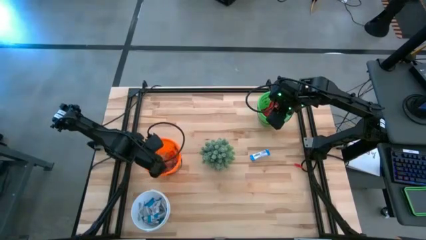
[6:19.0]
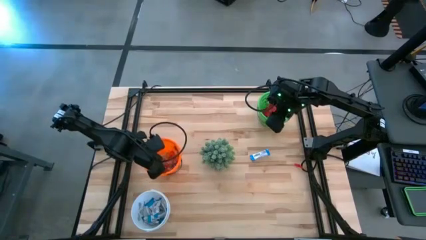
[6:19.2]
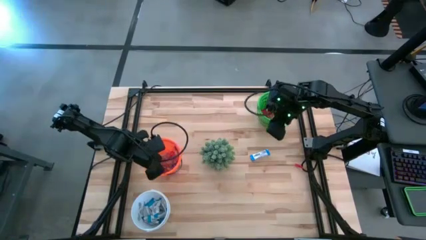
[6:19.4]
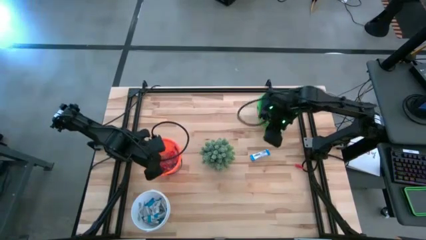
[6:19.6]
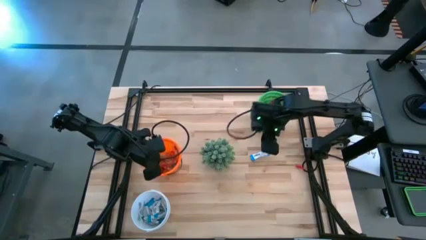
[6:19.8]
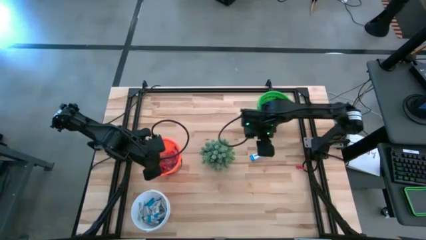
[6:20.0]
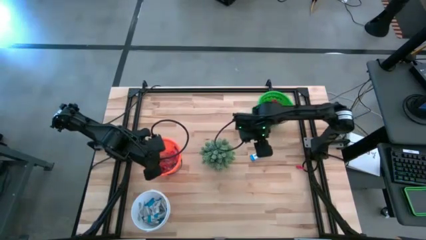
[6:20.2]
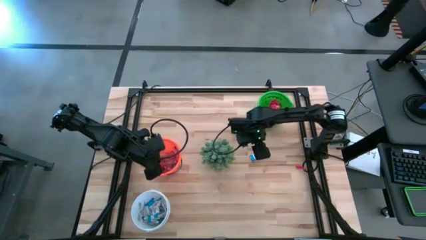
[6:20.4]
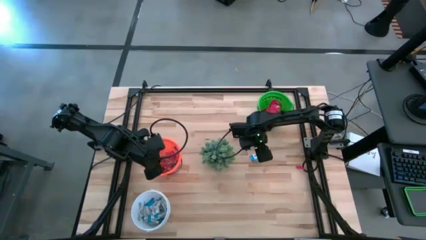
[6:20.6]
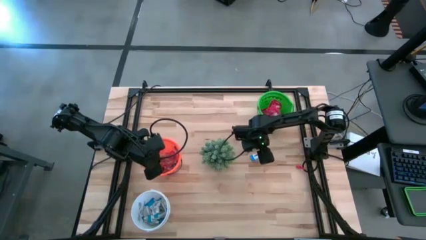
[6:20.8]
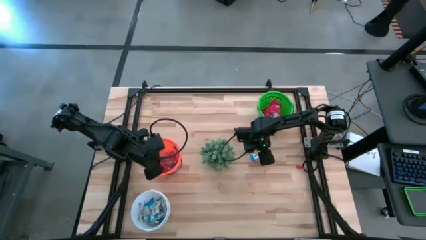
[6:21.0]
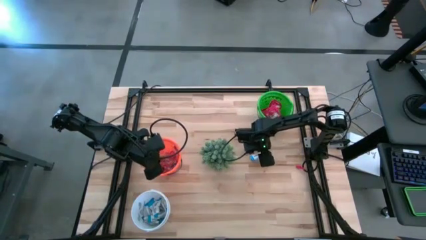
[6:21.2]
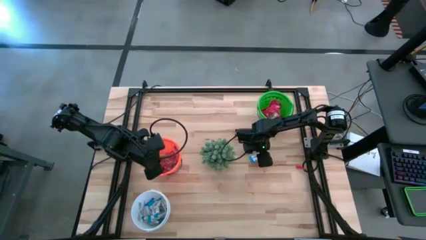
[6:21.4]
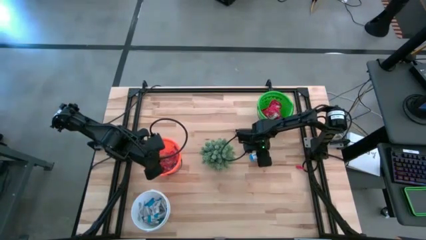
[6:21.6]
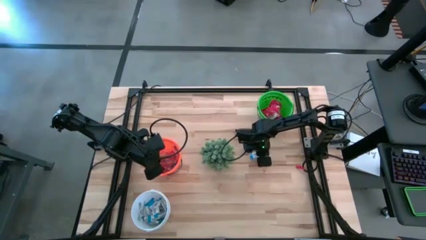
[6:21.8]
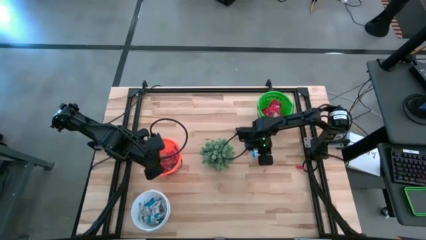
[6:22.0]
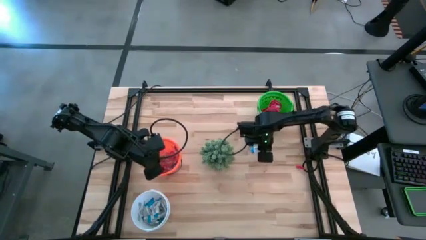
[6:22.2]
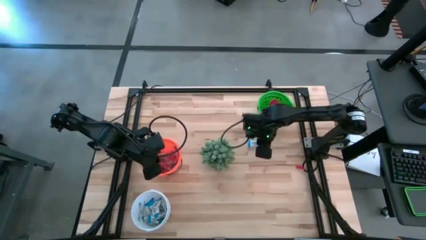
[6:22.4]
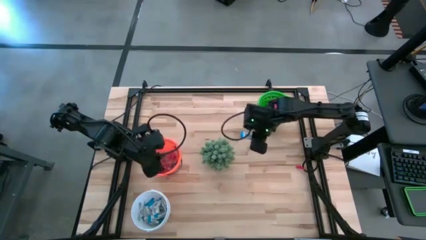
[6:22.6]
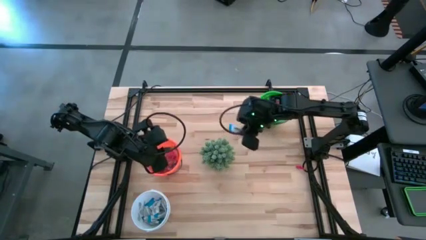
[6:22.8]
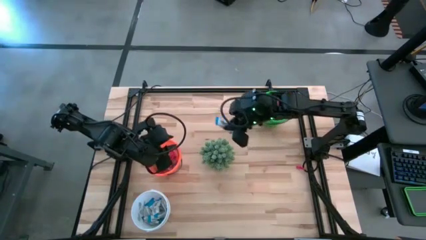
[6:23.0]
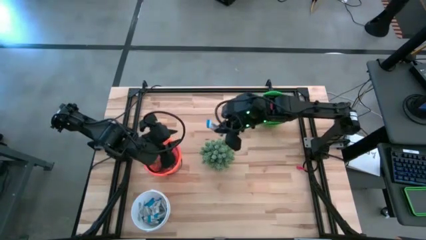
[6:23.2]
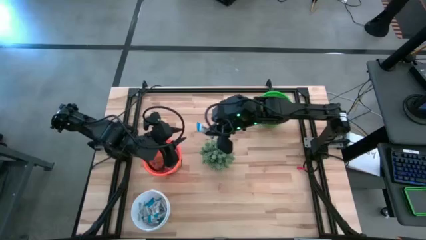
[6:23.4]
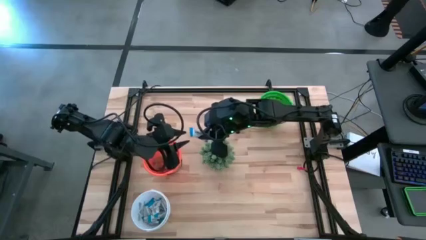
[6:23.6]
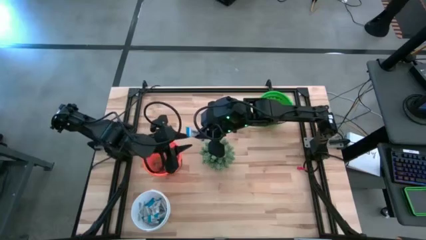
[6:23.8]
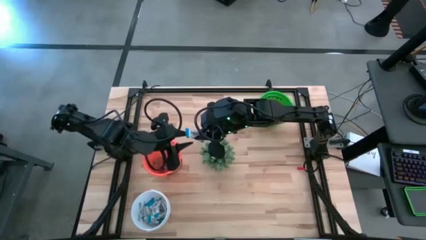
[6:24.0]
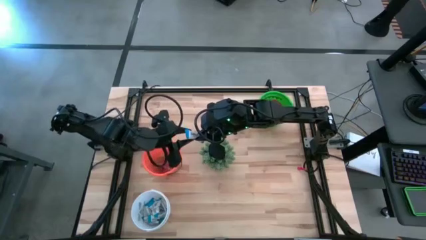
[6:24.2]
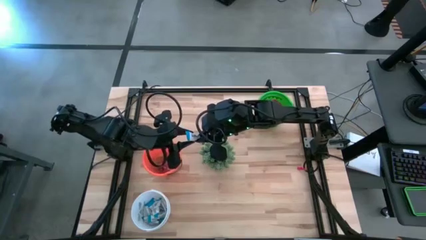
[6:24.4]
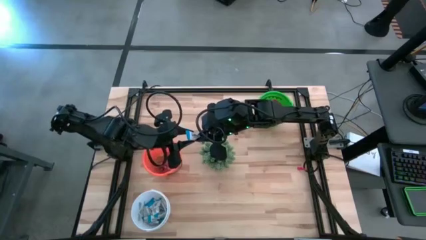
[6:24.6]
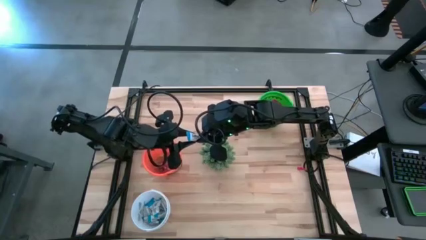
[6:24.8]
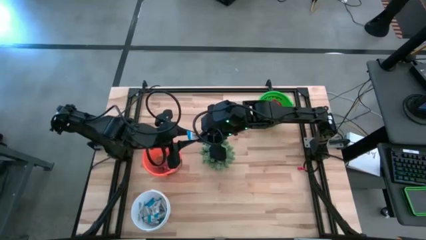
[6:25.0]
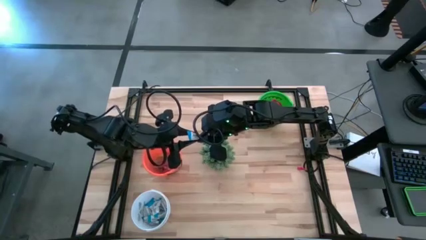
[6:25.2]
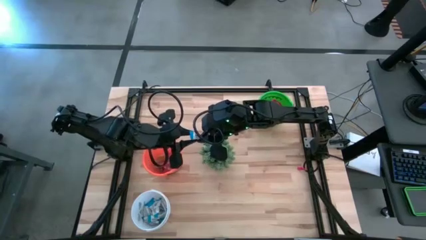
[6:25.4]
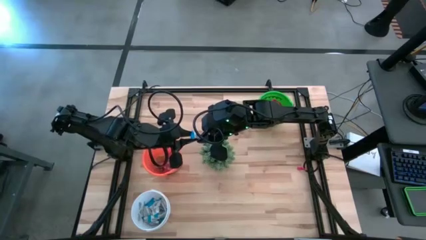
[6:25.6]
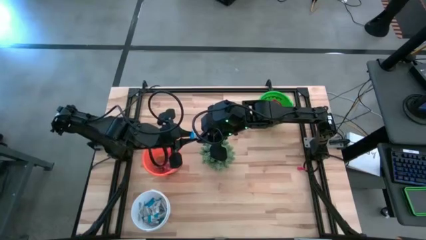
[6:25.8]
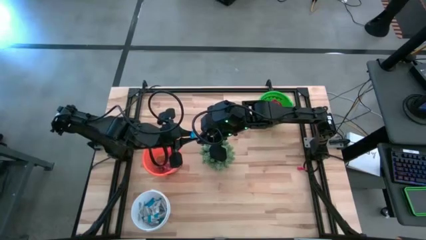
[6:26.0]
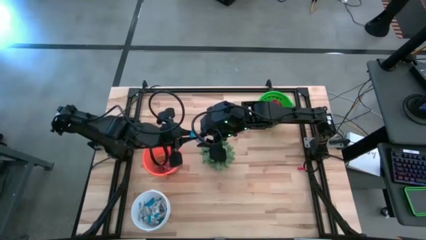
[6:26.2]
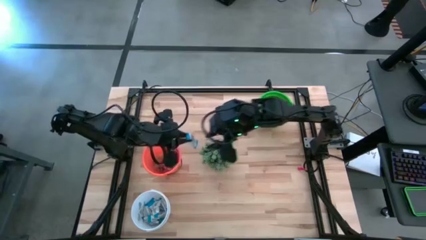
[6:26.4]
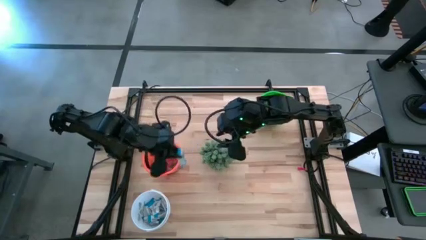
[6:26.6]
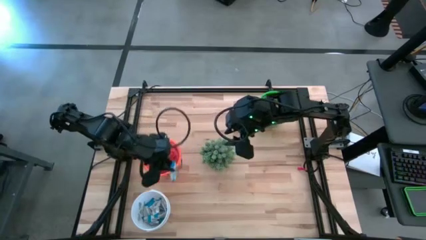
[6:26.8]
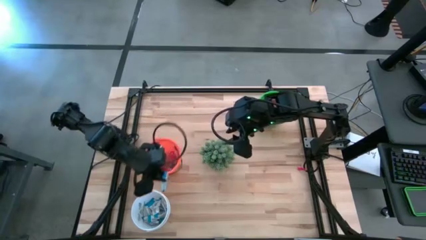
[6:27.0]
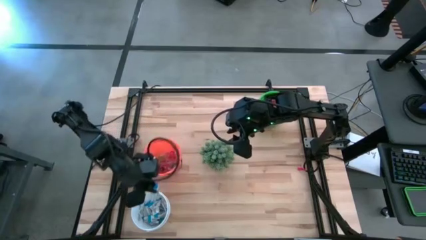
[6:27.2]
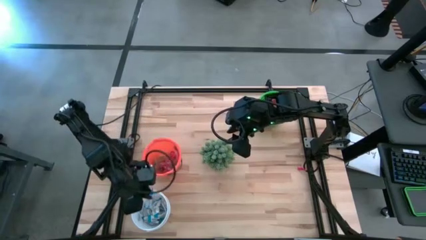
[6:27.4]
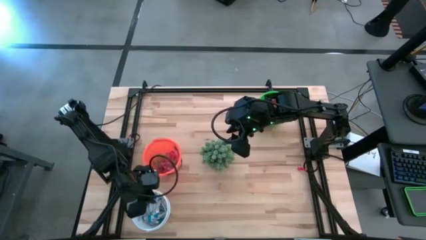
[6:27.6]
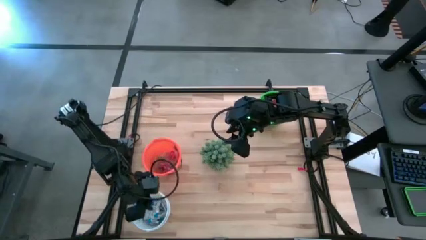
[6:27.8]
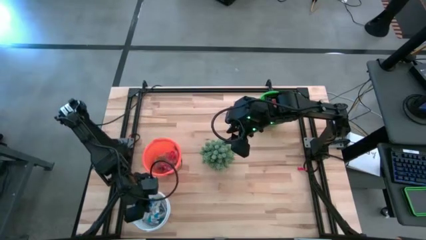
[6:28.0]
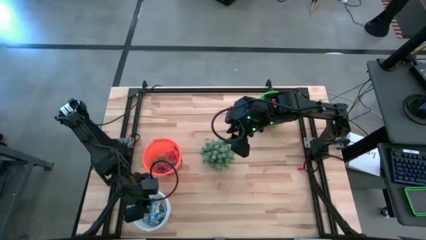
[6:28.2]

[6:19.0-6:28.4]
Task: Sort candy
Put the white chocolate into the white bucket

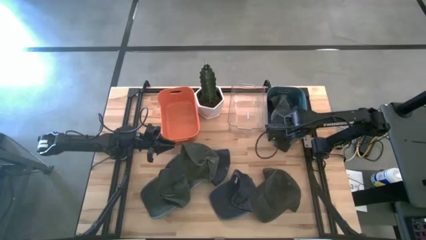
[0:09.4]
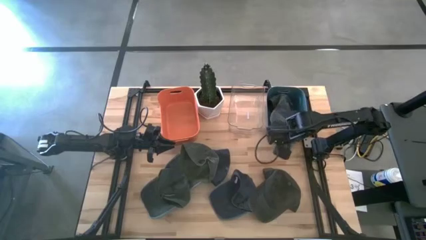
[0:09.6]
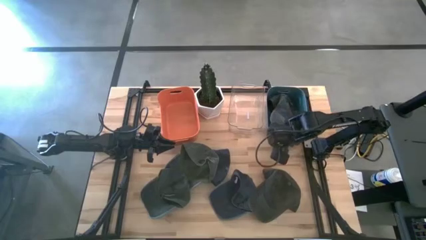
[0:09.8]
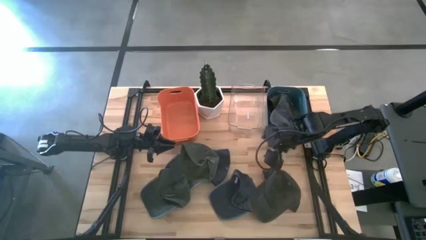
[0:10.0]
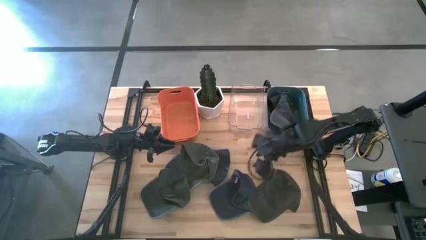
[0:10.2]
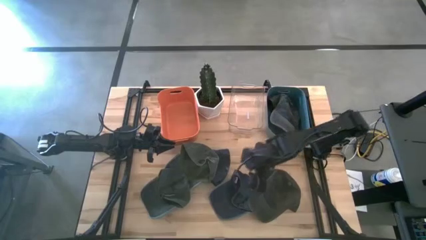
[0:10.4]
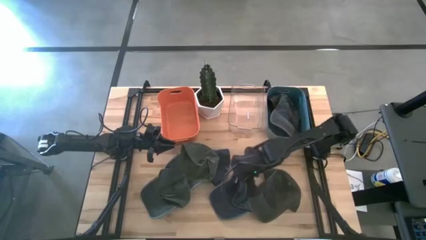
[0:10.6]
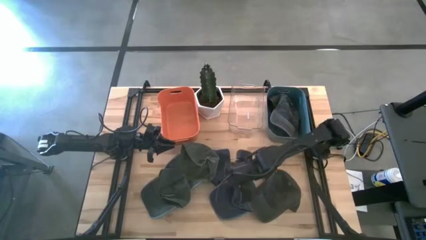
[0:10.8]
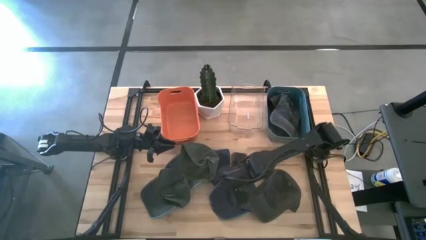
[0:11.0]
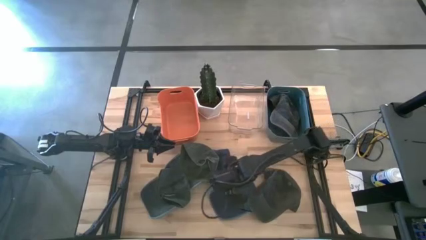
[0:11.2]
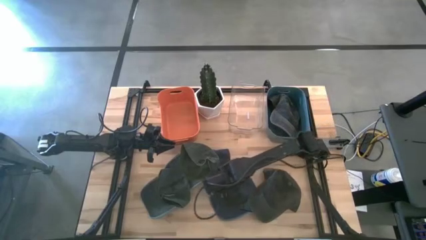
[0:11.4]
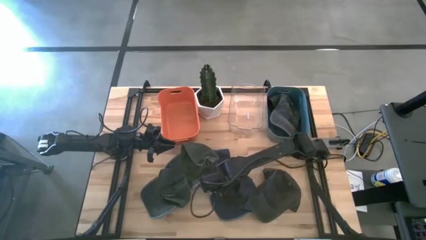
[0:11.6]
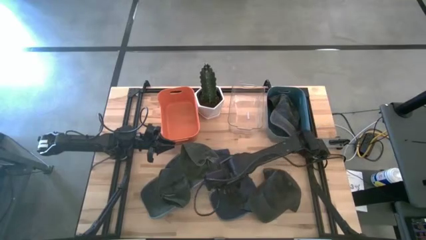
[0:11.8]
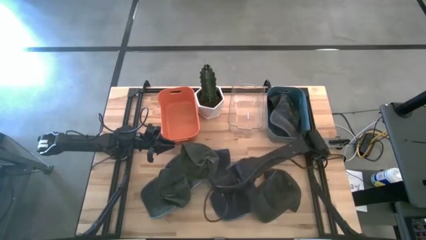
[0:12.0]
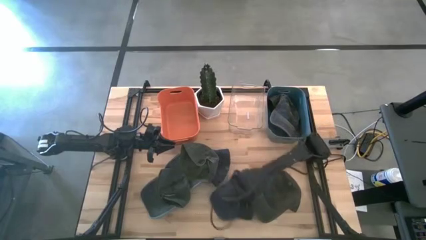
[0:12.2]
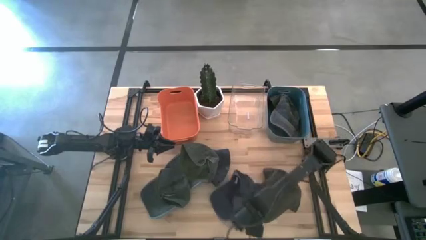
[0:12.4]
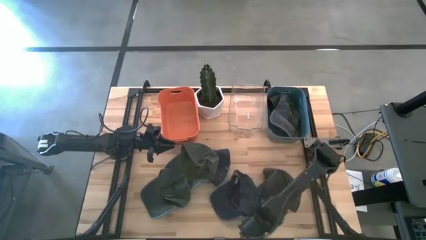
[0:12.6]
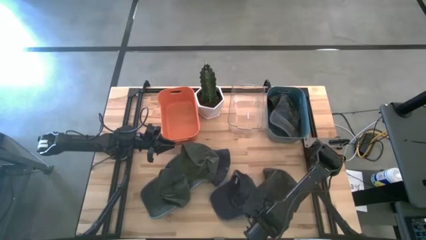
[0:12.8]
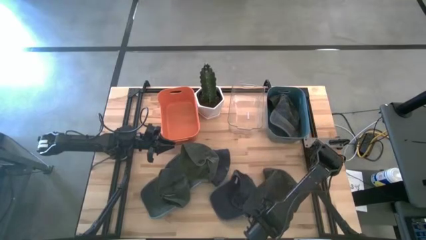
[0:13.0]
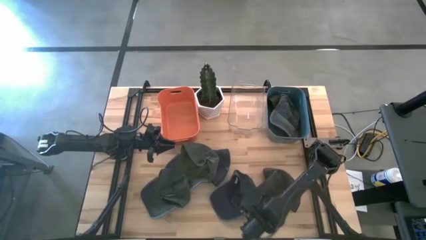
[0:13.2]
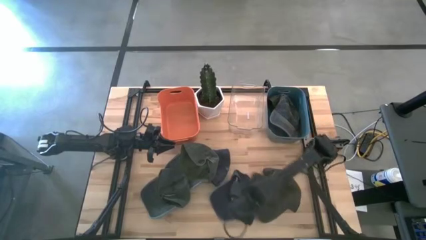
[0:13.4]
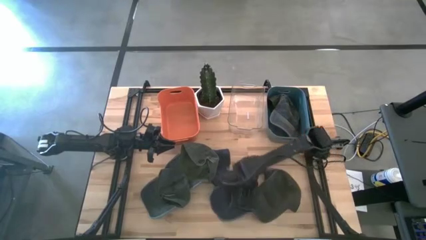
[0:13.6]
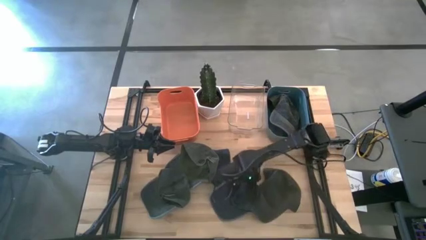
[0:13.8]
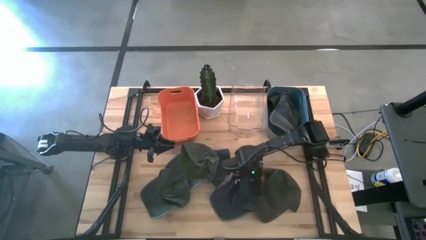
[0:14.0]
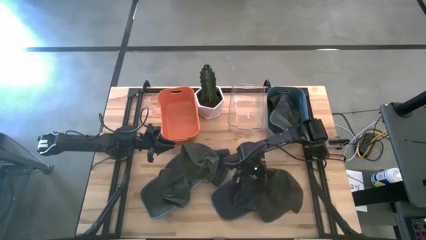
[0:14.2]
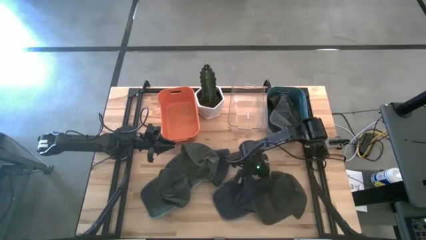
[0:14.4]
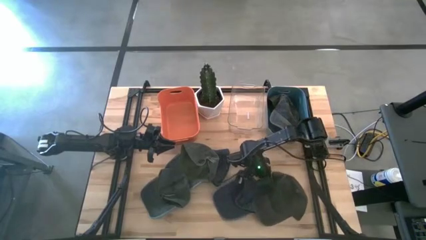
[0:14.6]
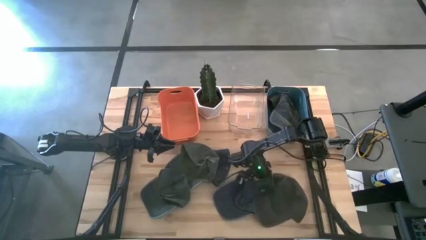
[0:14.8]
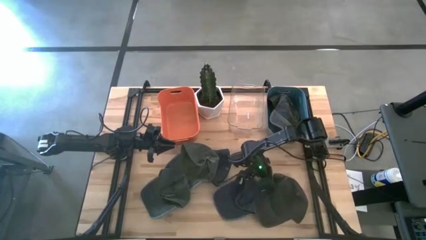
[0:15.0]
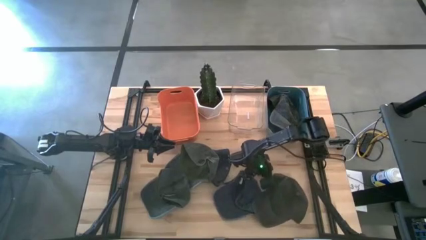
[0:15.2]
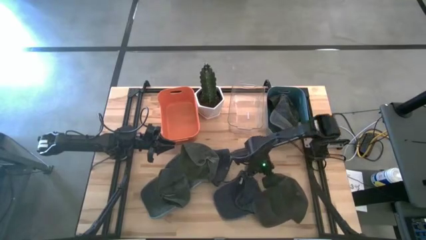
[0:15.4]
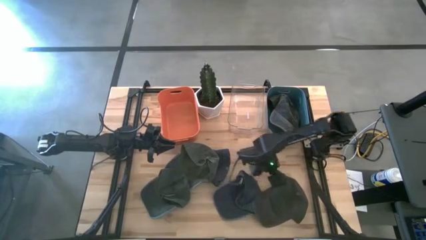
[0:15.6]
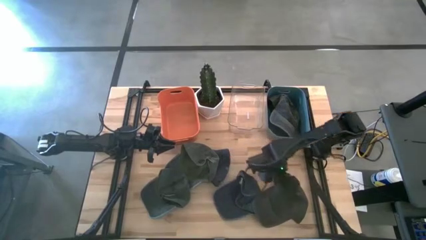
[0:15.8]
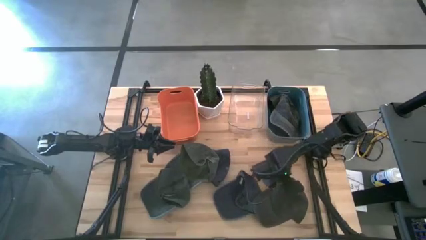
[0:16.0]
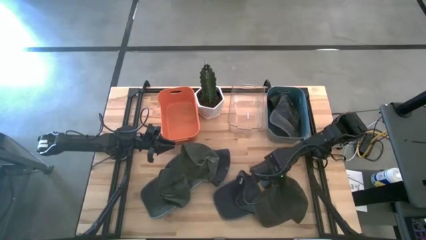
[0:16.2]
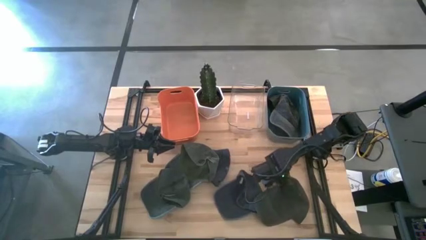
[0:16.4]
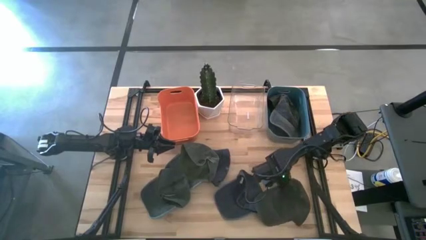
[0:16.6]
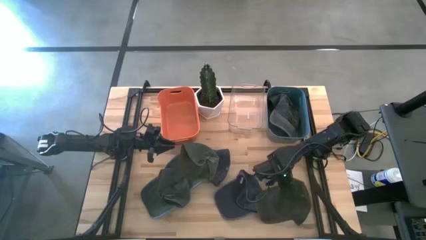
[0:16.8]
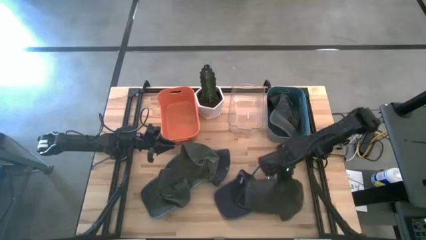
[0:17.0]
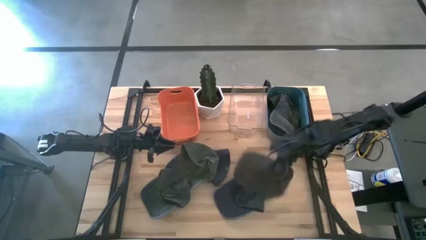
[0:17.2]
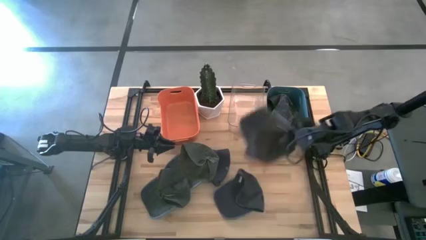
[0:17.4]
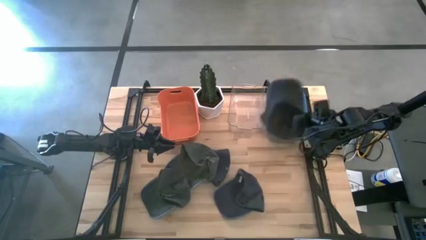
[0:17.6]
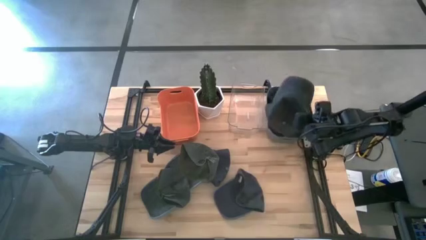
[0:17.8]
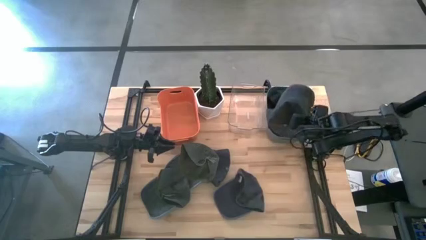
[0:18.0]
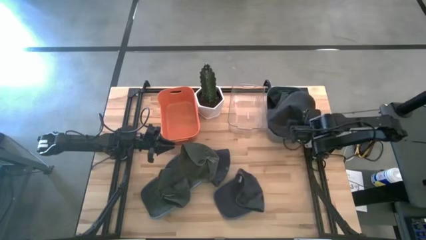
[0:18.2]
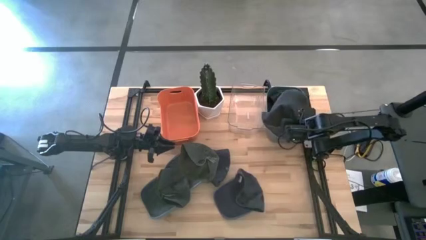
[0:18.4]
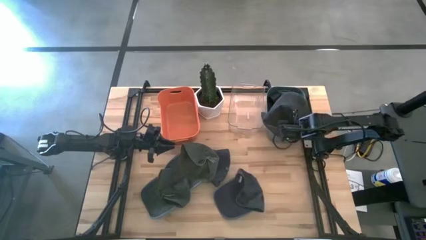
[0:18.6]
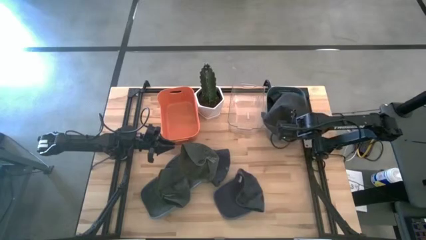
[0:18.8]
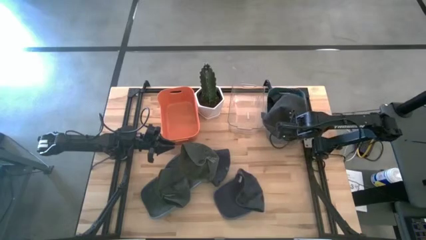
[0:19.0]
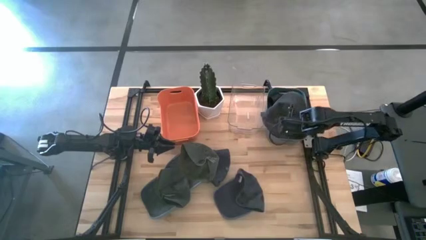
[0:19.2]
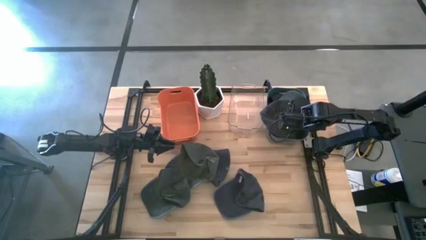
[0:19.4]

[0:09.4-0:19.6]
Task: Pick & Place hat
Put the black cap into the blue bin
